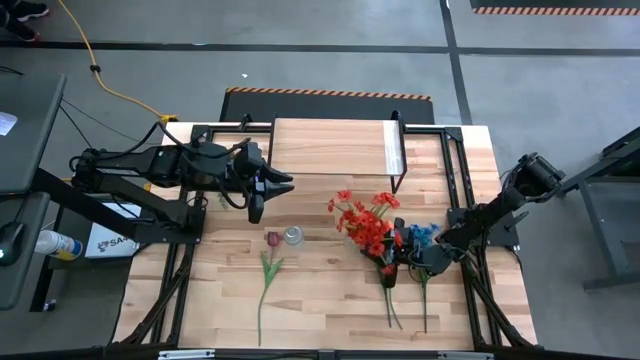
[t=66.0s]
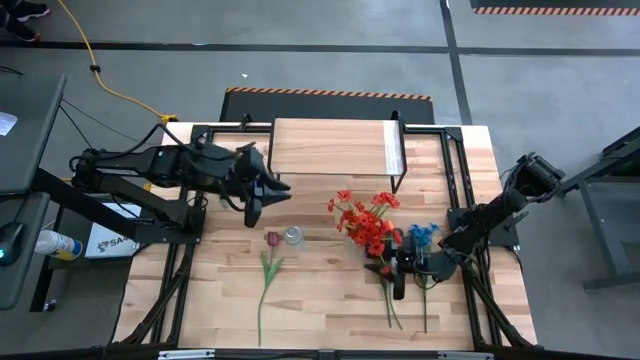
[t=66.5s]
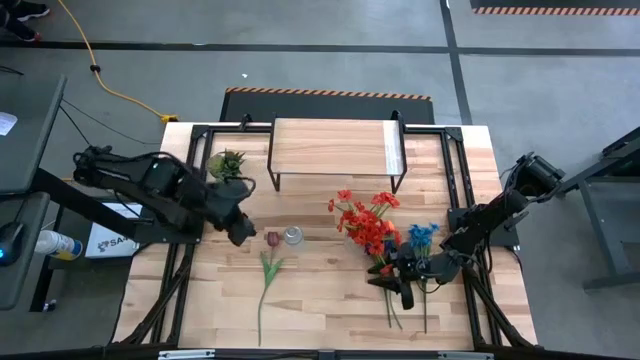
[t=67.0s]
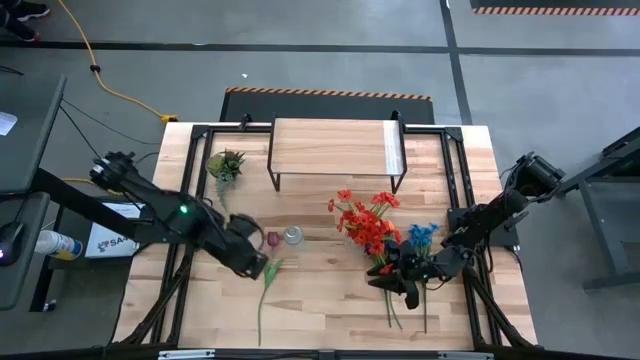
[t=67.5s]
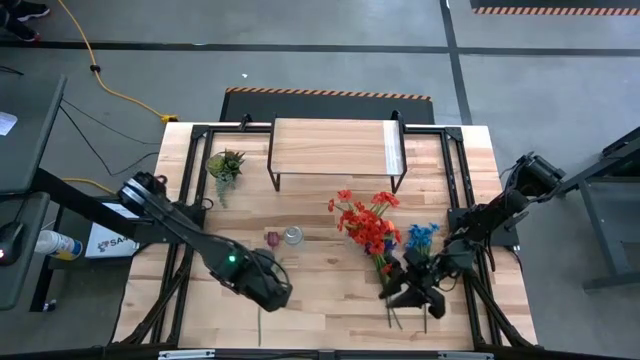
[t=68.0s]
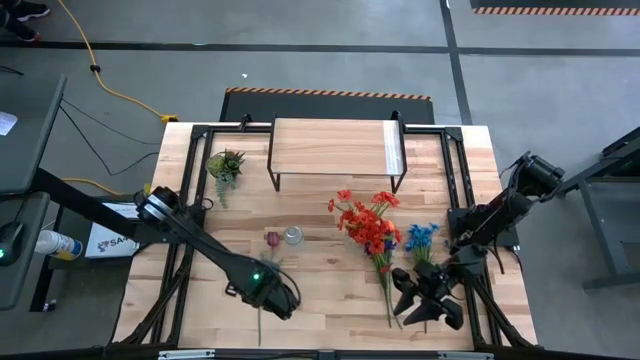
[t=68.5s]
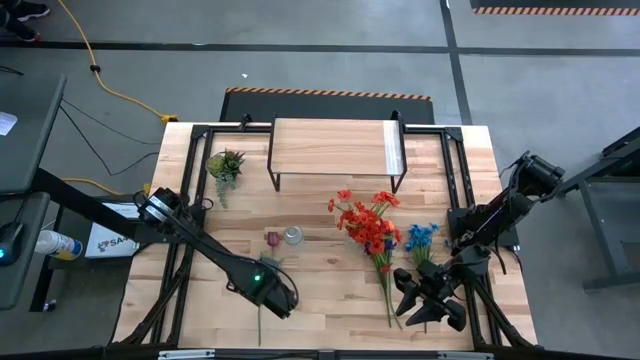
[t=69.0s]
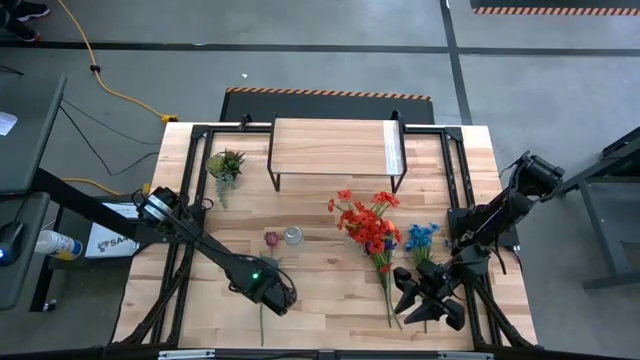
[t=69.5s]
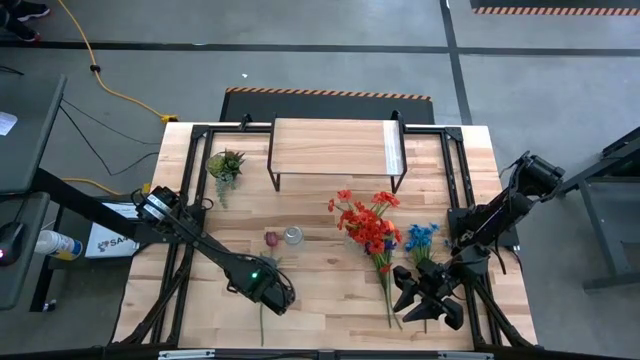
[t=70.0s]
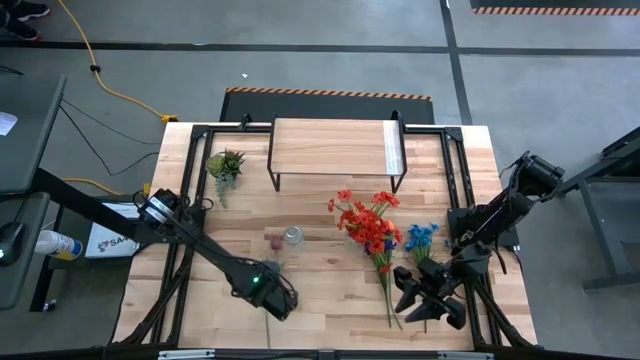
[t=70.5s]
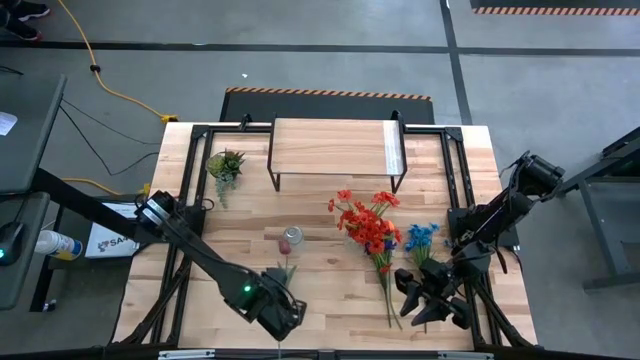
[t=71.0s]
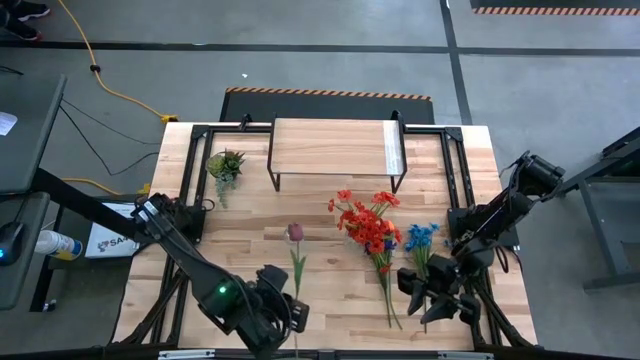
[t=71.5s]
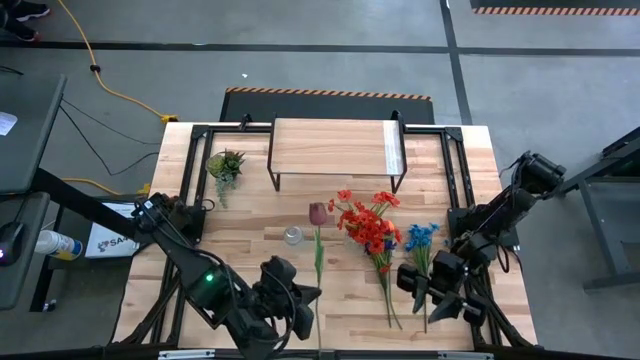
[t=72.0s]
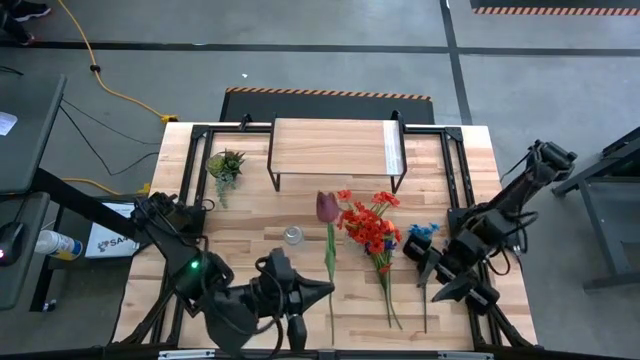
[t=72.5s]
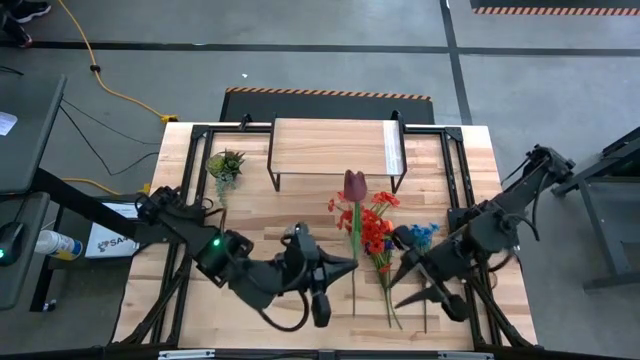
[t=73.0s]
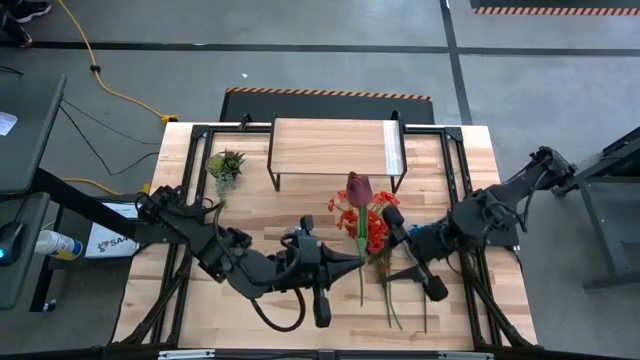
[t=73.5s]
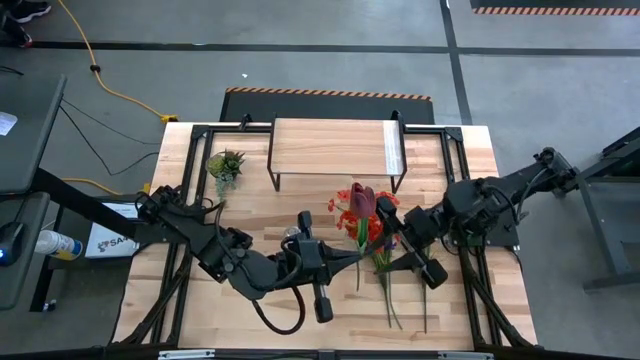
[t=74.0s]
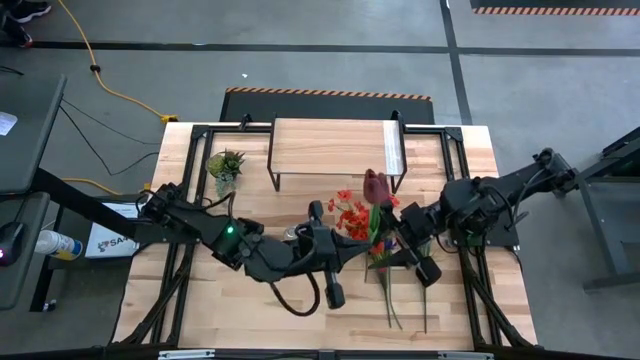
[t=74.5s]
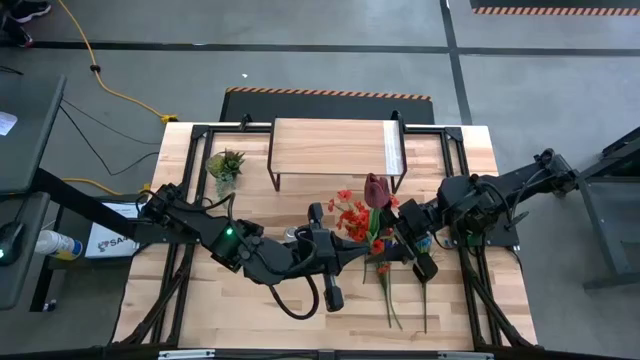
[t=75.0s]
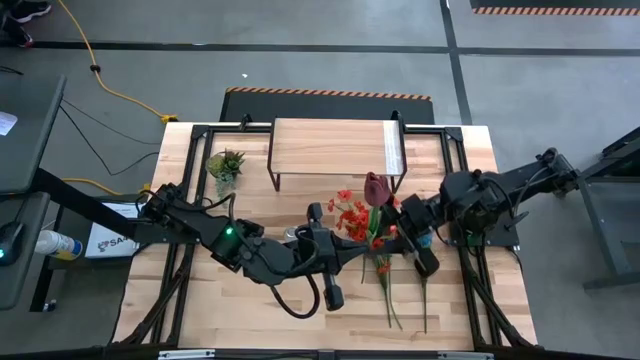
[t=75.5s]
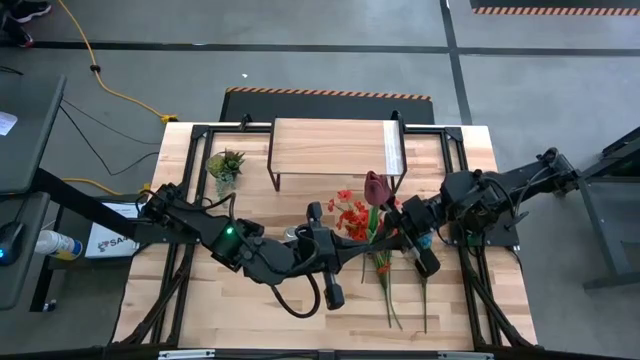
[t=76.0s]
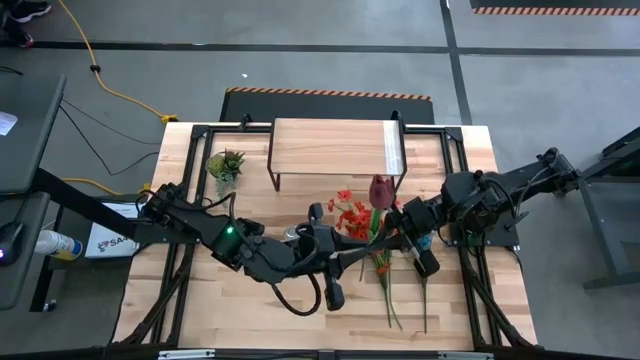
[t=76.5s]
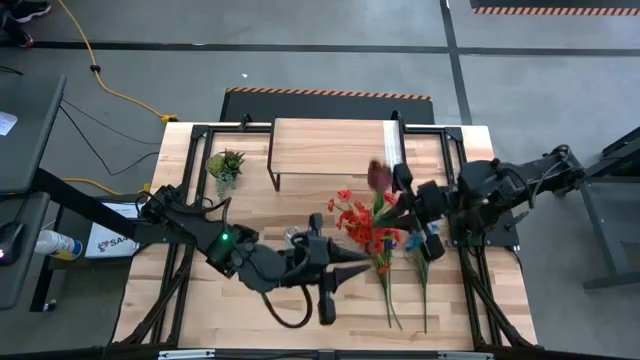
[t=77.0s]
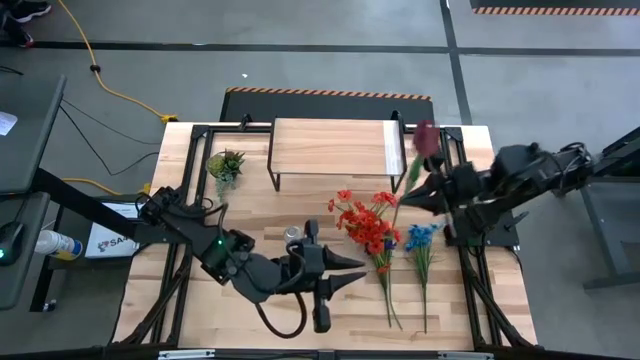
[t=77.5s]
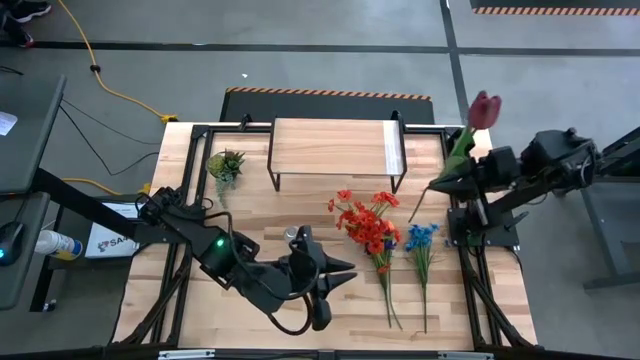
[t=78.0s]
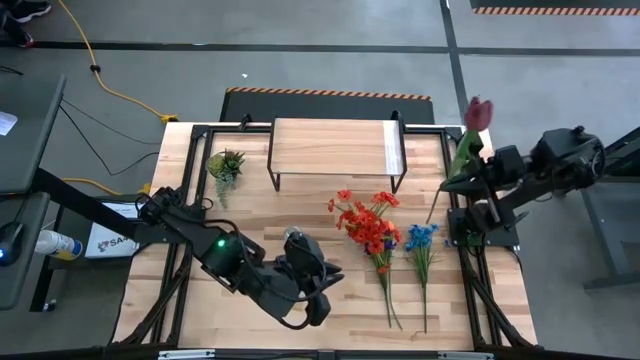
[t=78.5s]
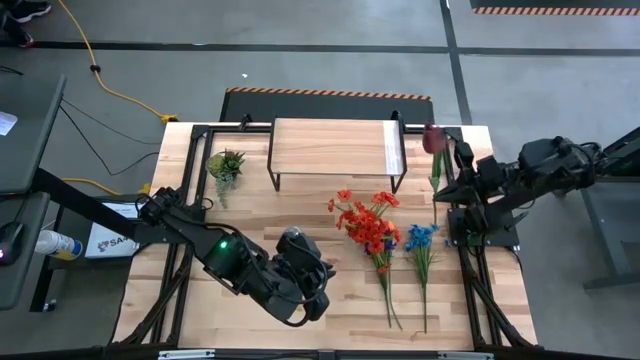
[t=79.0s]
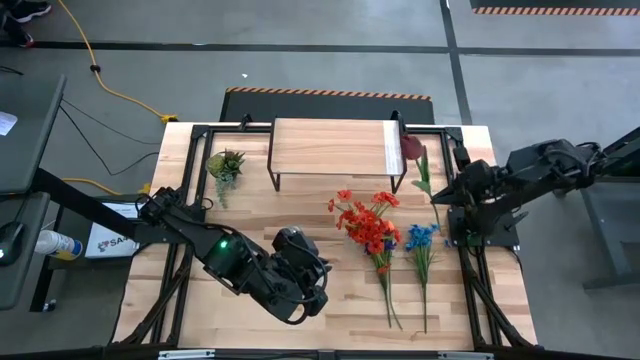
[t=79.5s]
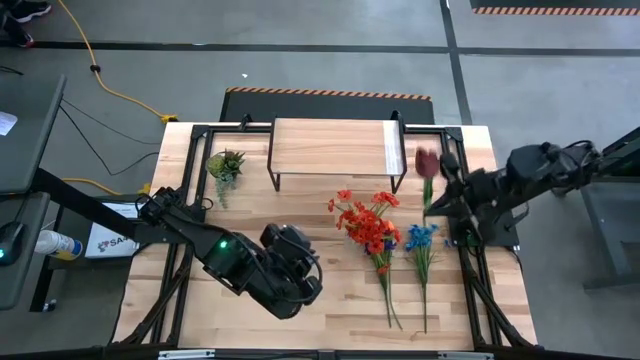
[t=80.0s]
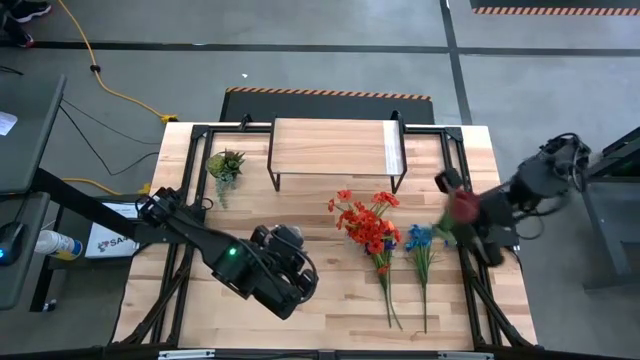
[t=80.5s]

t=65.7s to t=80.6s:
Task: Pick and place flowers into a vace then onto a shelf
Put the red tulip into the right transparent vase

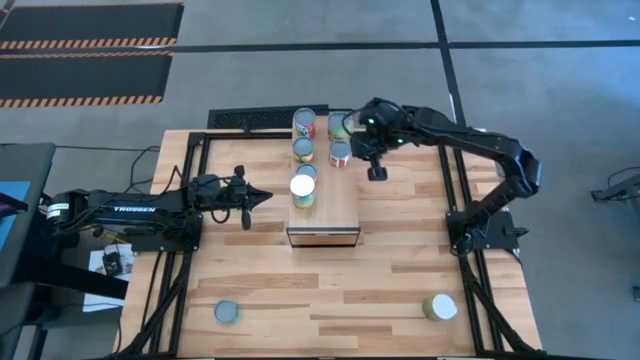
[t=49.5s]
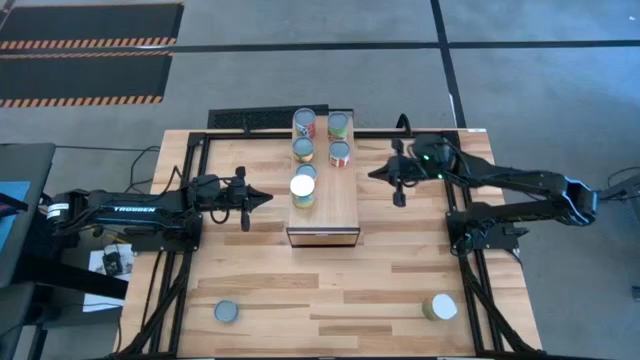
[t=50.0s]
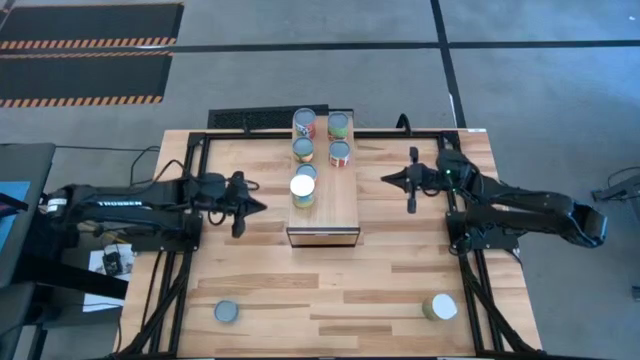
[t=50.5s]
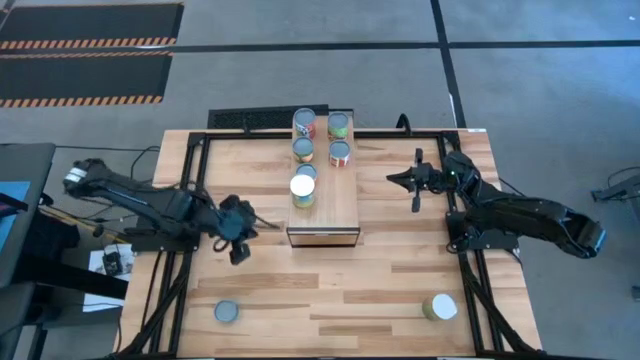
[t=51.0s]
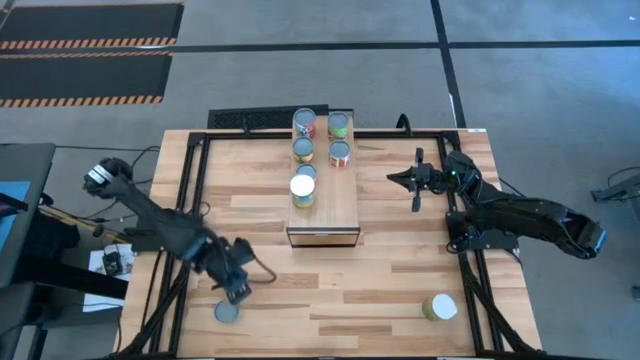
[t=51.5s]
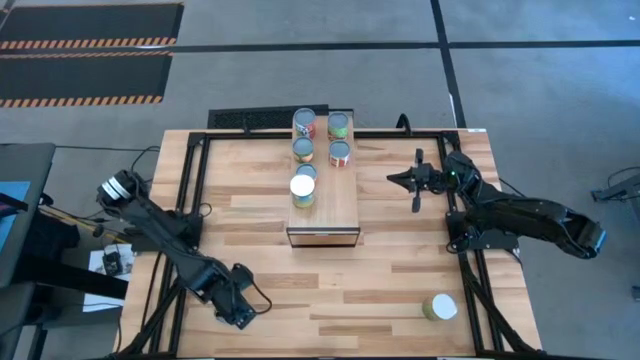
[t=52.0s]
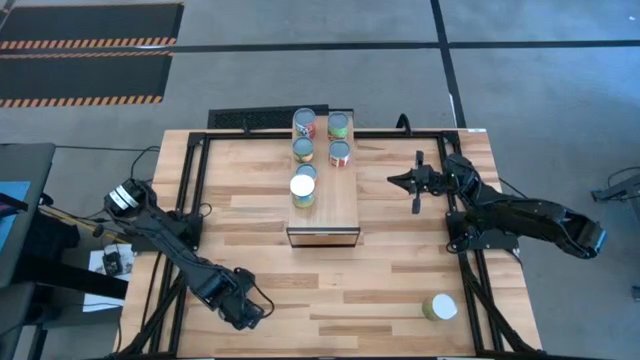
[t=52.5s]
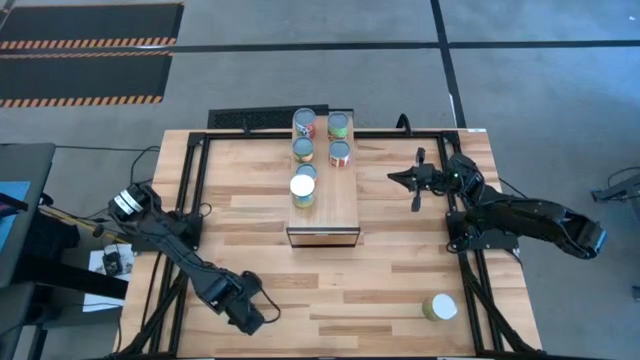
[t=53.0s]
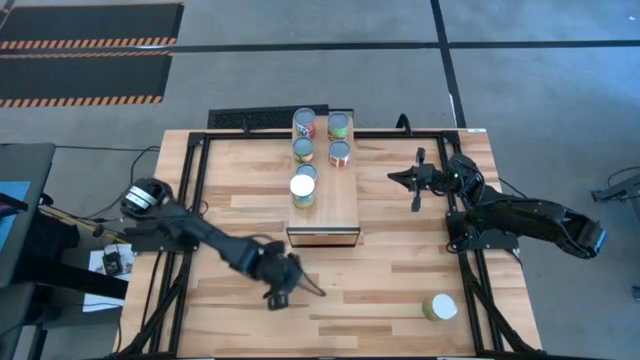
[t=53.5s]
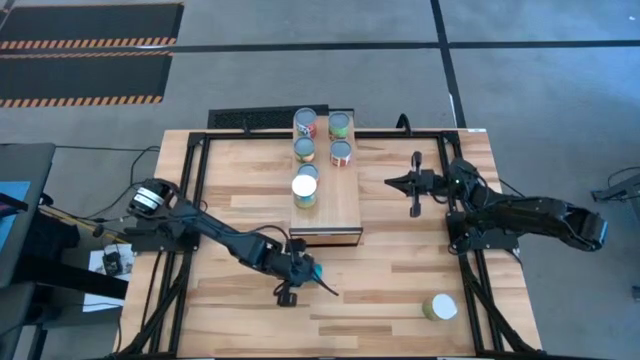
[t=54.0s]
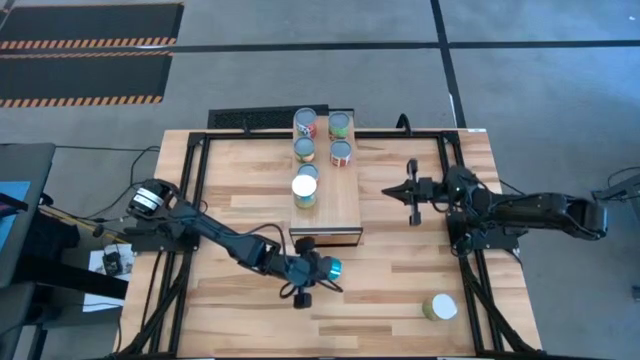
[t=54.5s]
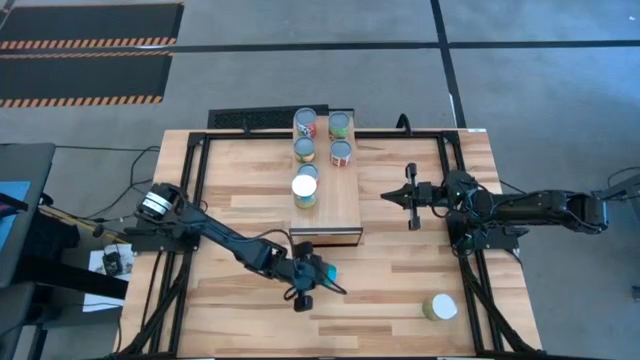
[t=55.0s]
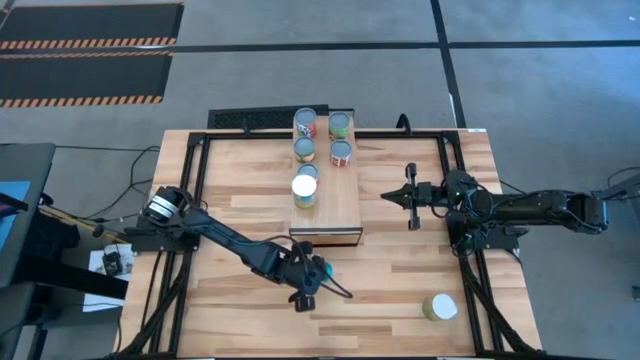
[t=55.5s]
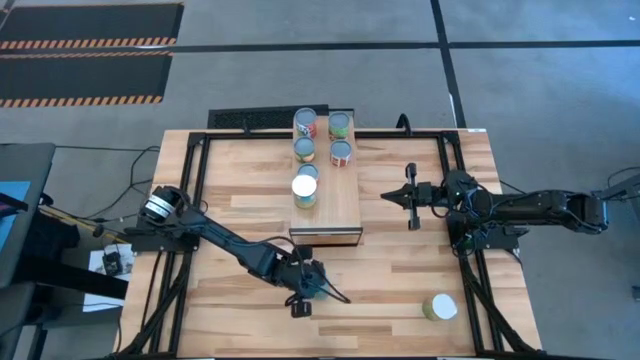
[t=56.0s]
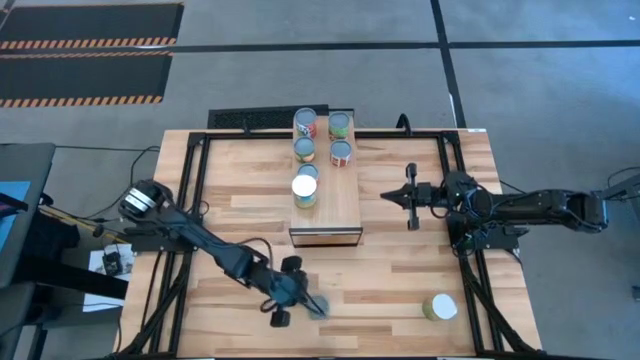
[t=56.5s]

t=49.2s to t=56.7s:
Task: Pick and place cans onto a shelf
Put the canned tuna on the shelf aligned with other cans
